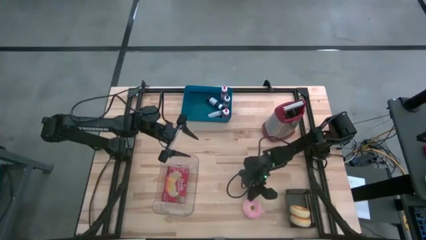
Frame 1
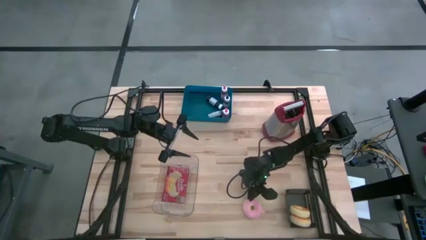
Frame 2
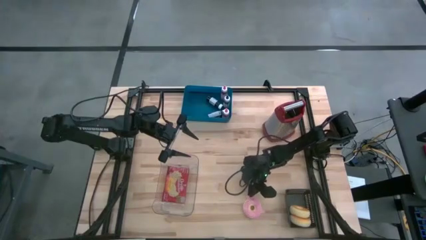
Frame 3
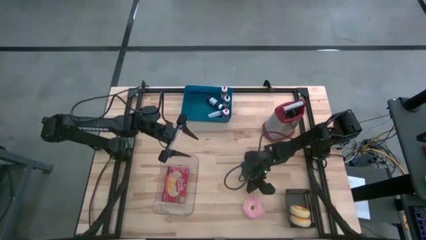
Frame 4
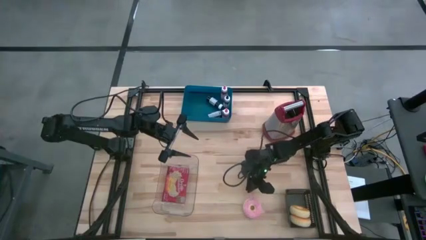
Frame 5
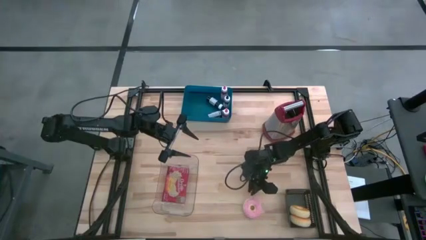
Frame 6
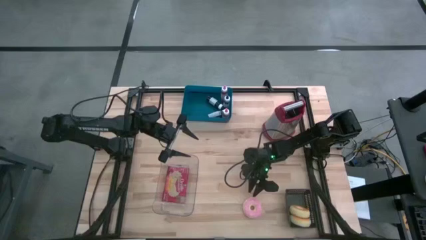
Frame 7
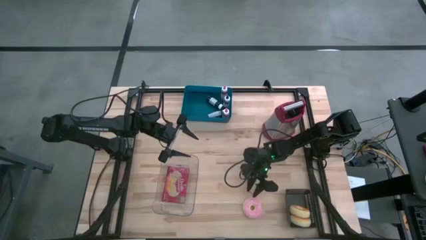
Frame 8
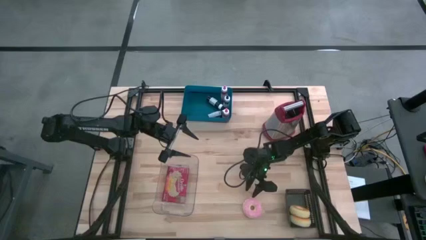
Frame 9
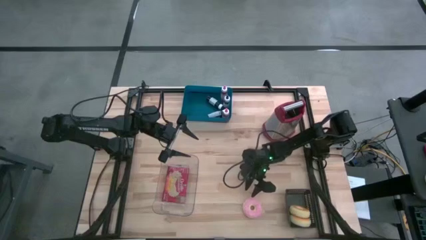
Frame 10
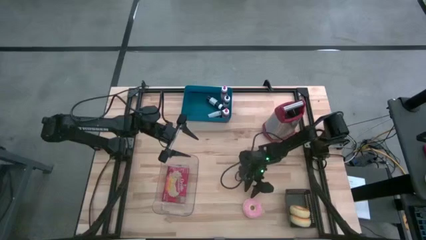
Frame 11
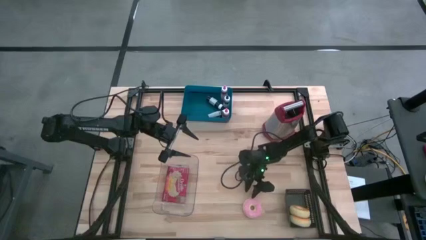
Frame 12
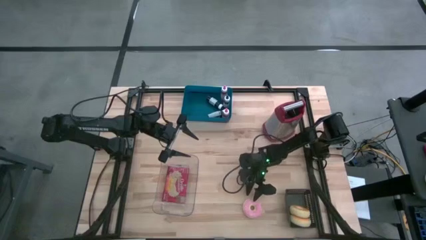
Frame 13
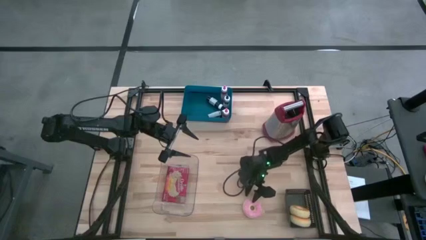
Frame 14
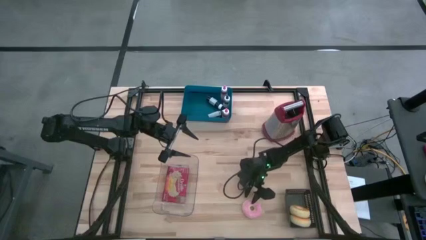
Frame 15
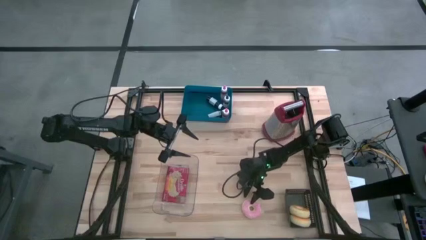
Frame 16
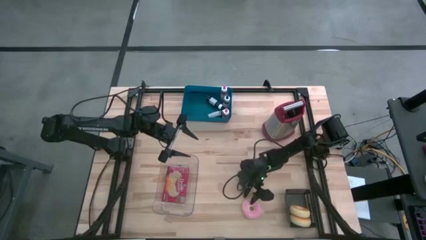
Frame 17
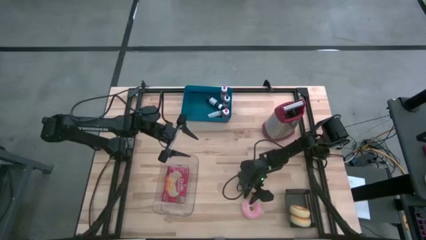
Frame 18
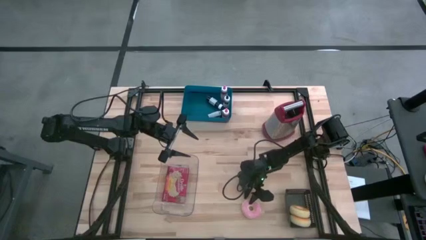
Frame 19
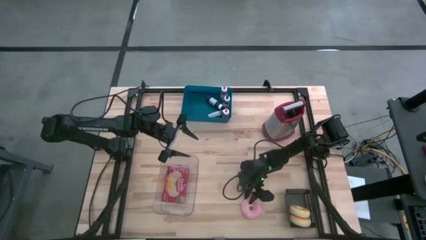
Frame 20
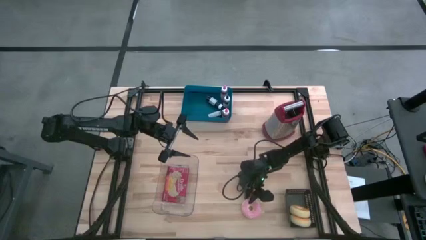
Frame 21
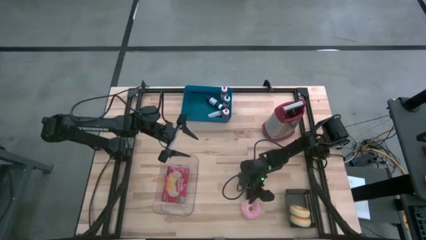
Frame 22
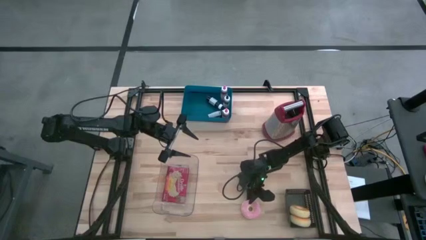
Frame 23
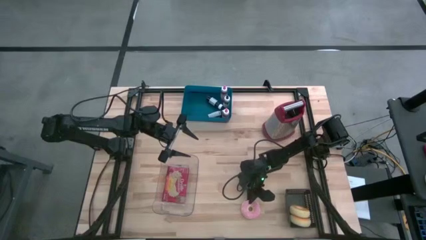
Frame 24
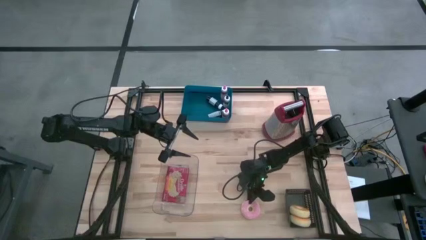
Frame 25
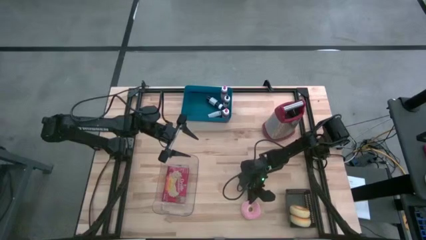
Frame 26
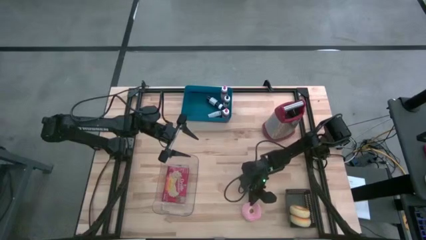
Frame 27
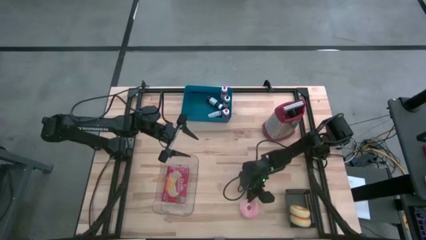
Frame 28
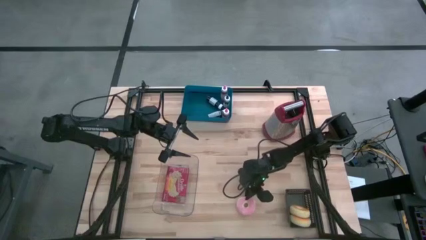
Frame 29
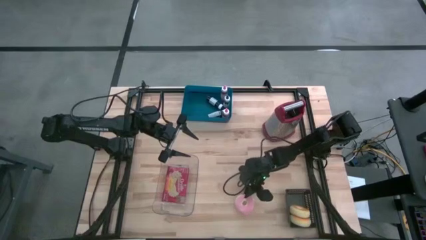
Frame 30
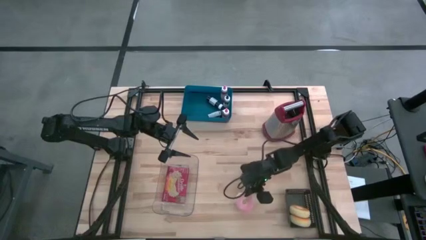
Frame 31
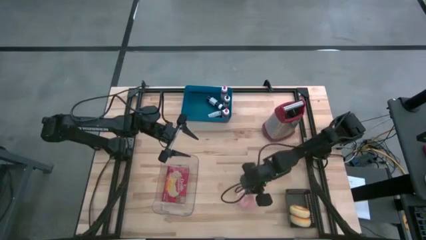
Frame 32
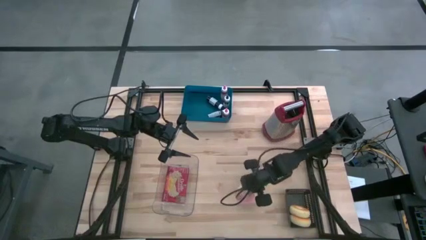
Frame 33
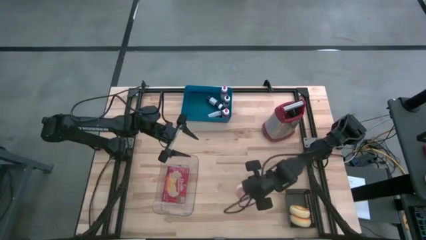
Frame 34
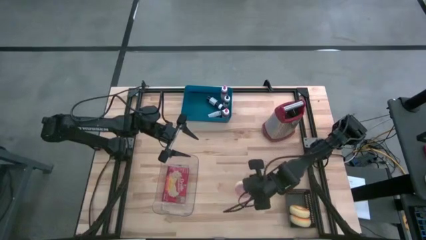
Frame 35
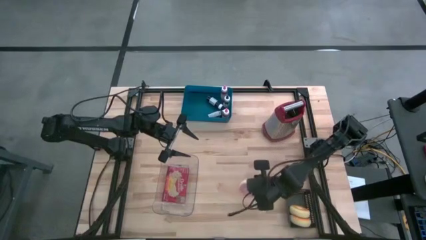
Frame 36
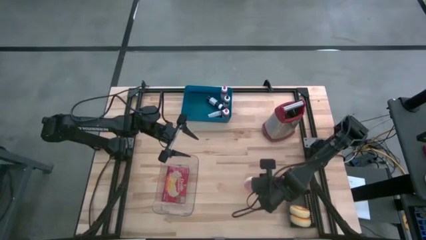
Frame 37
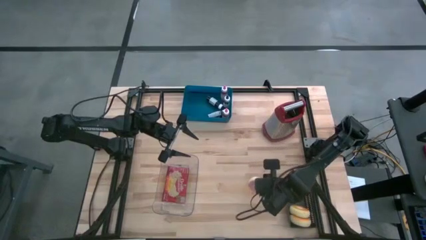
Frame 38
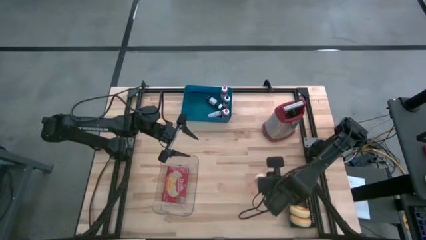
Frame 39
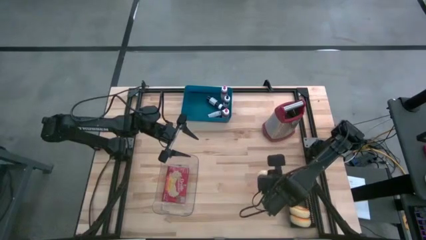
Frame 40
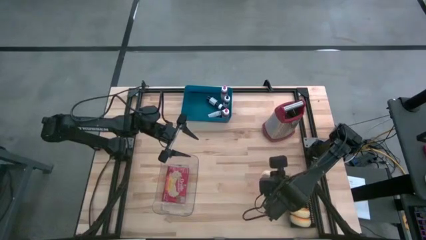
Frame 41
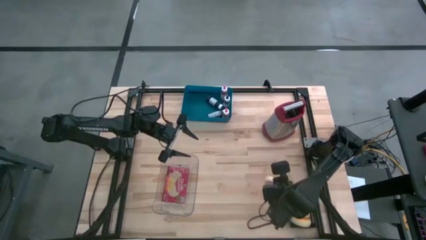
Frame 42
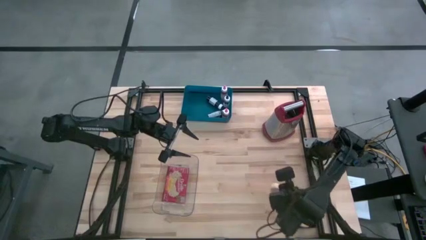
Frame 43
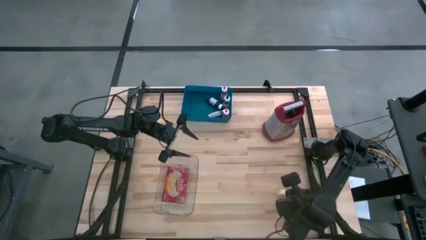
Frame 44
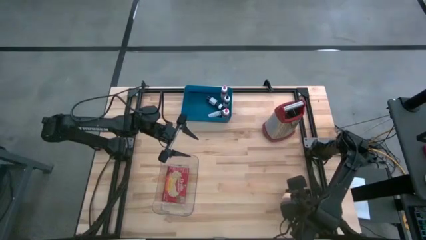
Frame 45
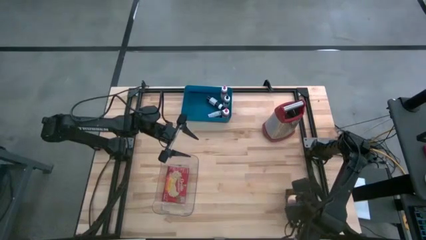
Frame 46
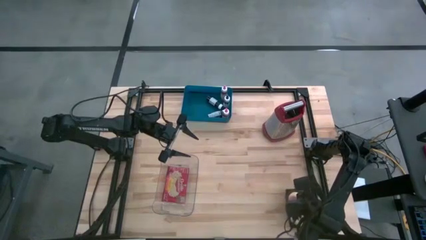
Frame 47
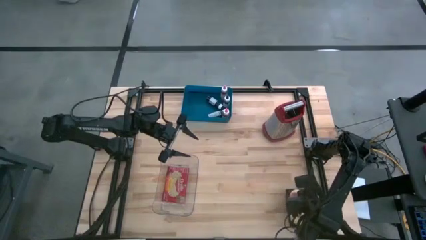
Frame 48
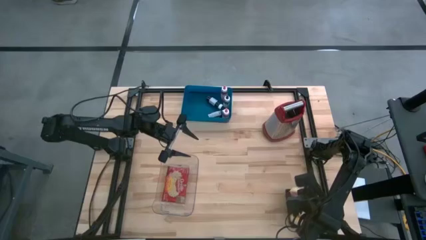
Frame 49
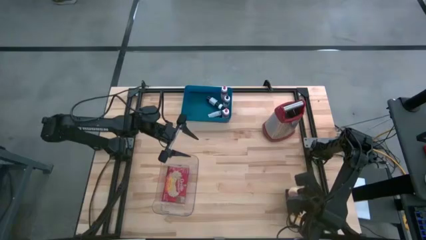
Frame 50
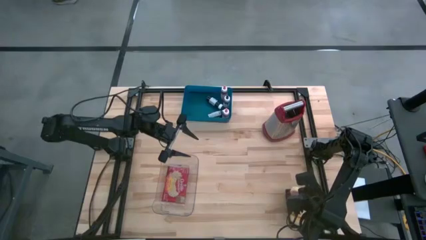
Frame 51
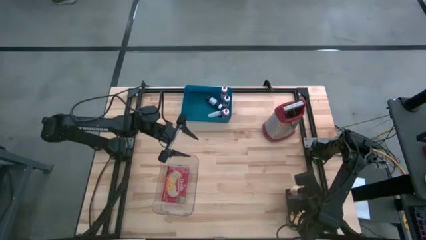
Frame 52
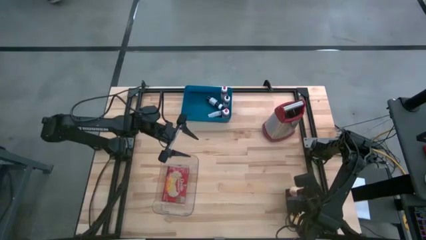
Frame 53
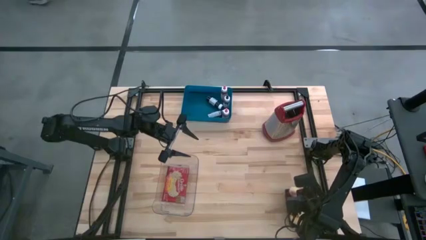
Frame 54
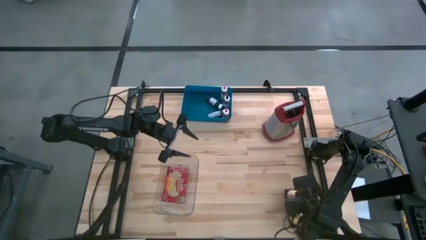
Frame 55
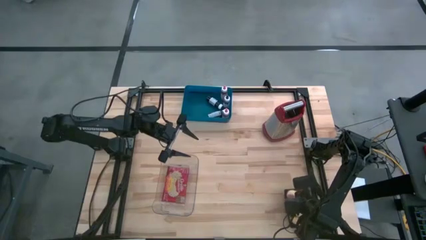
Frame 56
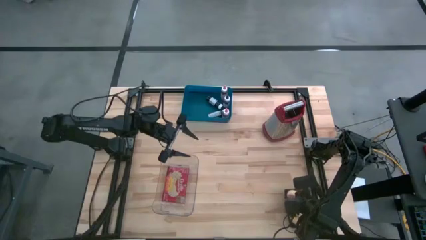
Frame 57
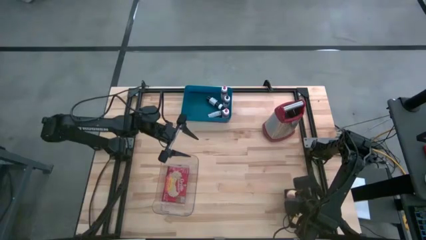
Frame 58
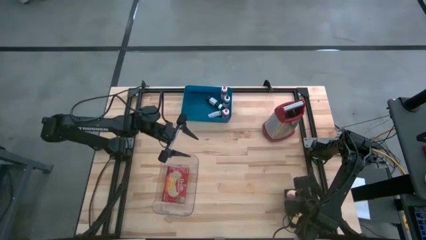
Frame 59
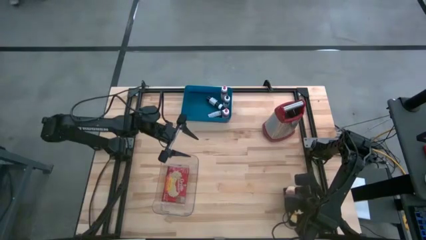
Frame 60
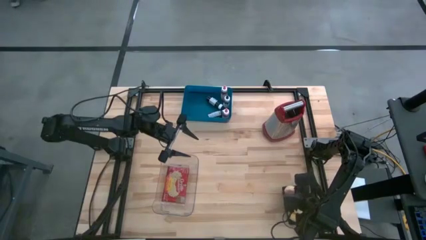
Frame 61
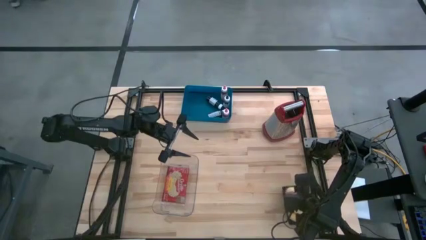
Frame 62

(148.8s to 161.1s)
Task: Pick & Place Food Item
Put the pink donut into the black bin
